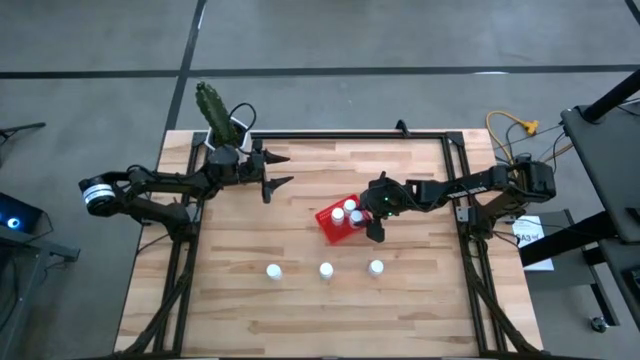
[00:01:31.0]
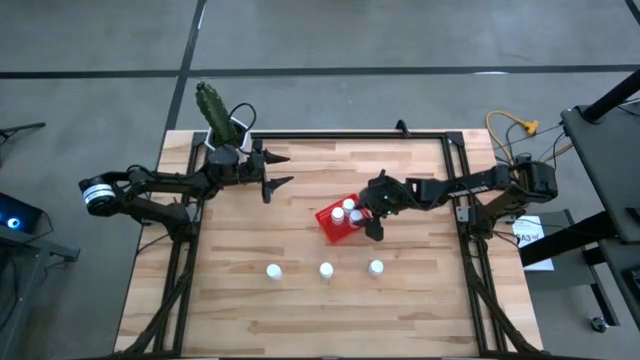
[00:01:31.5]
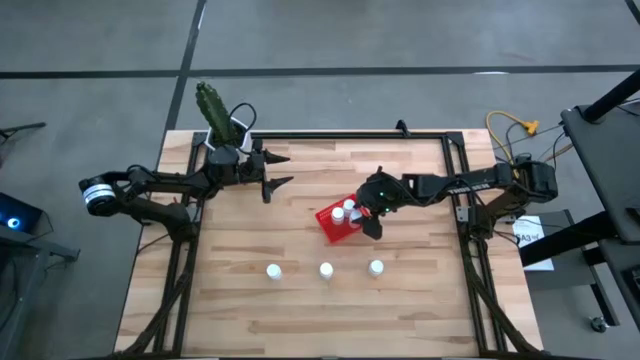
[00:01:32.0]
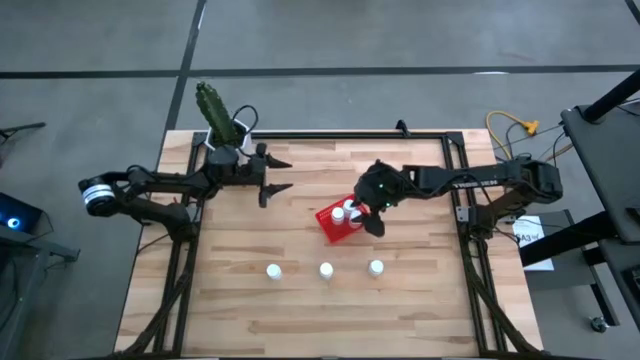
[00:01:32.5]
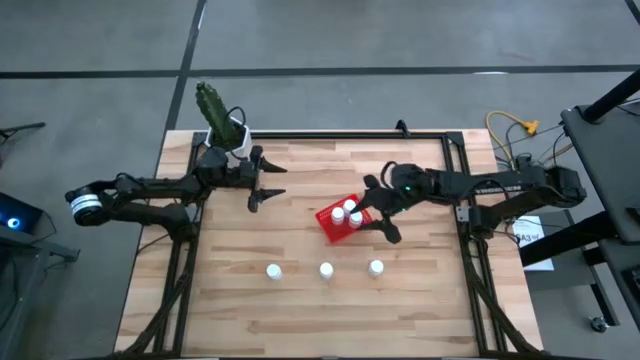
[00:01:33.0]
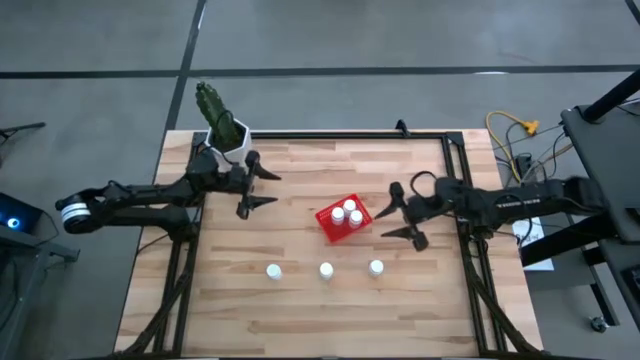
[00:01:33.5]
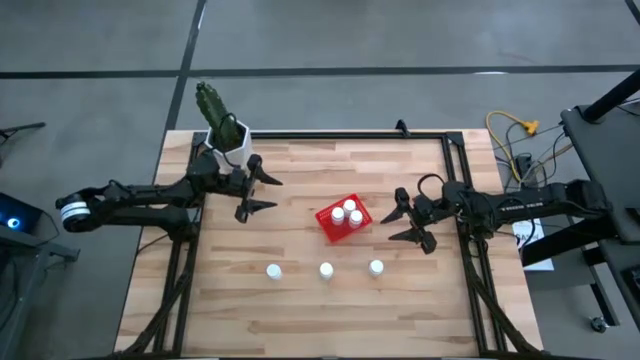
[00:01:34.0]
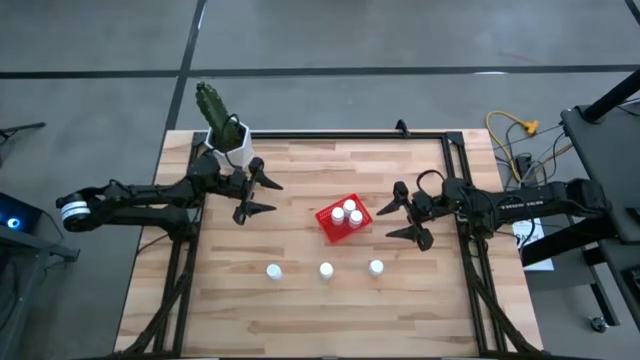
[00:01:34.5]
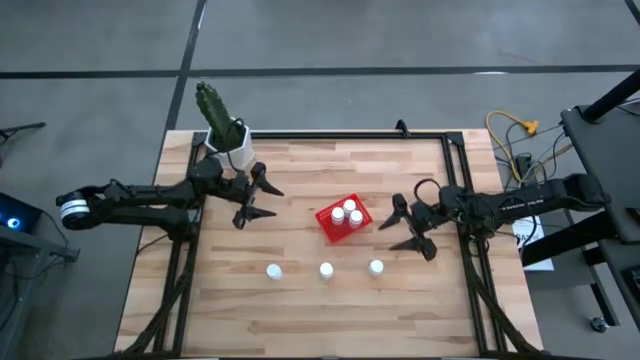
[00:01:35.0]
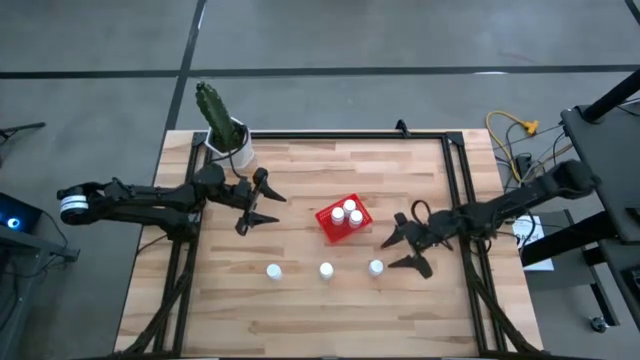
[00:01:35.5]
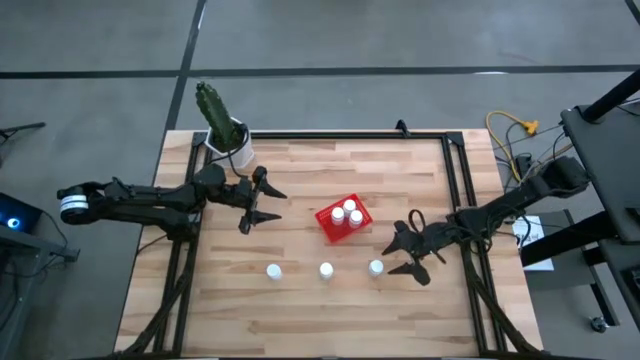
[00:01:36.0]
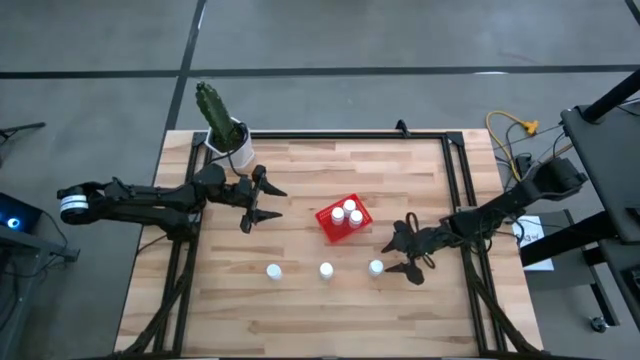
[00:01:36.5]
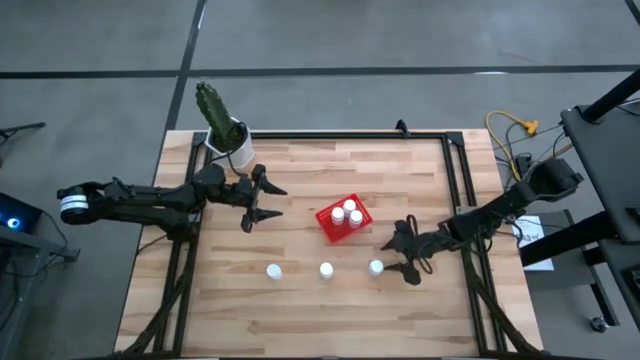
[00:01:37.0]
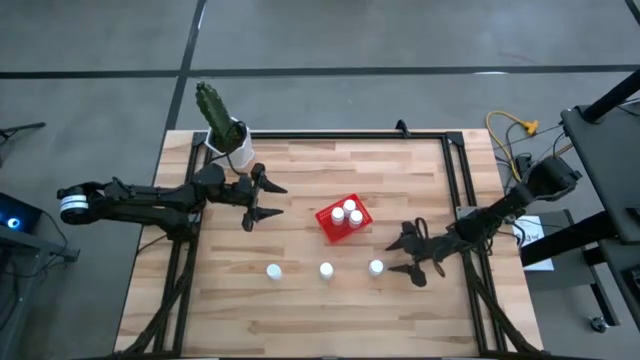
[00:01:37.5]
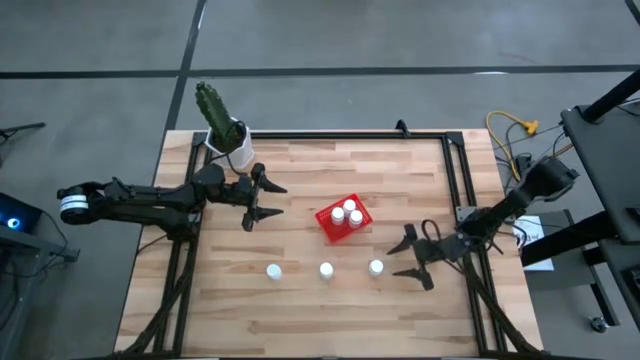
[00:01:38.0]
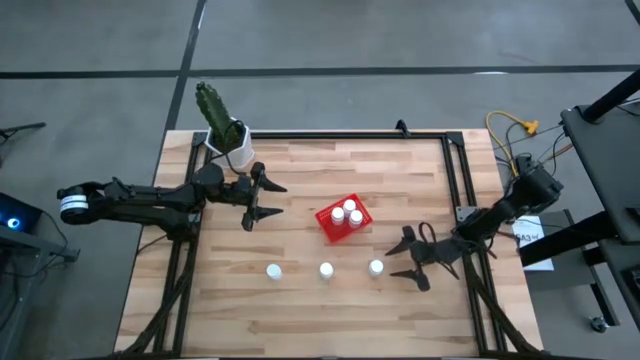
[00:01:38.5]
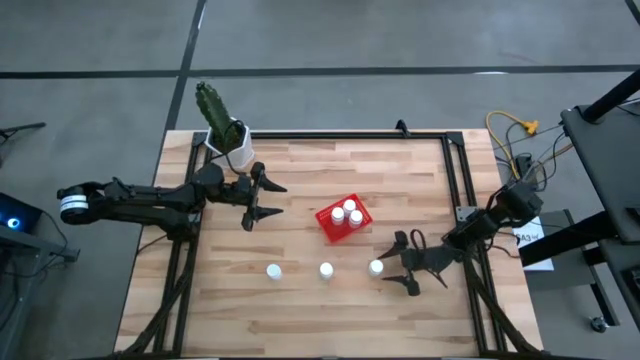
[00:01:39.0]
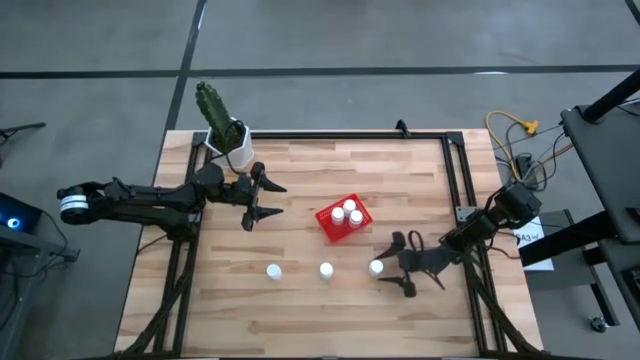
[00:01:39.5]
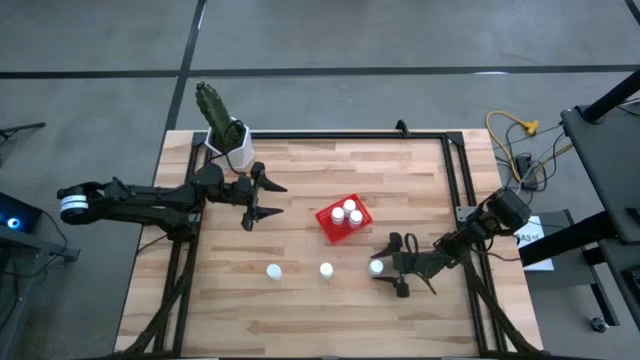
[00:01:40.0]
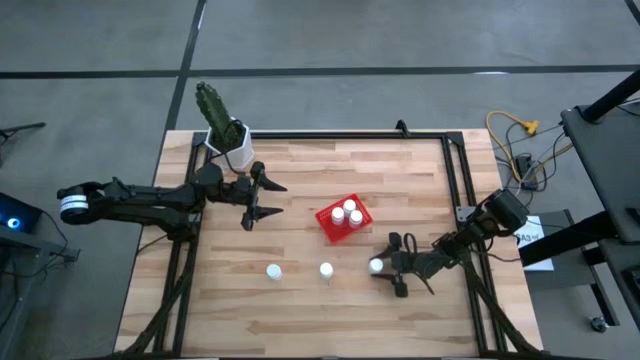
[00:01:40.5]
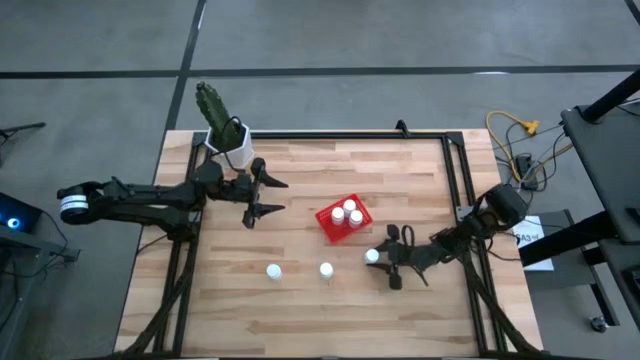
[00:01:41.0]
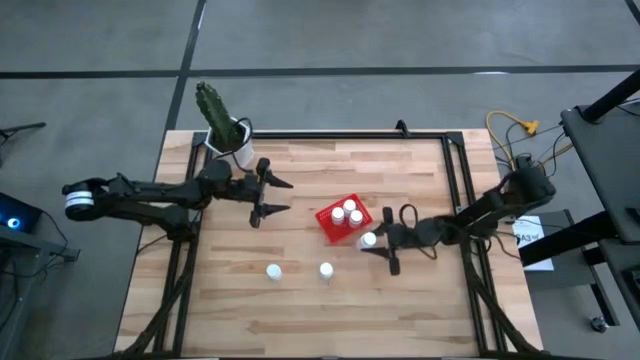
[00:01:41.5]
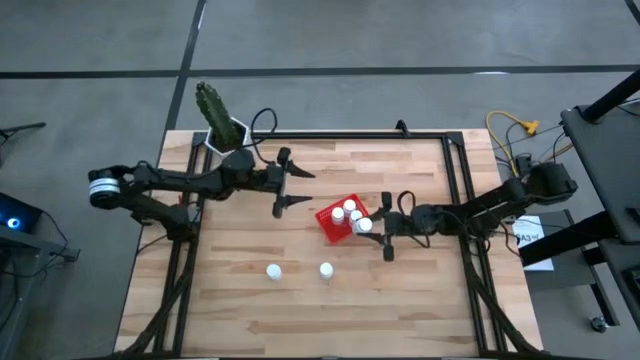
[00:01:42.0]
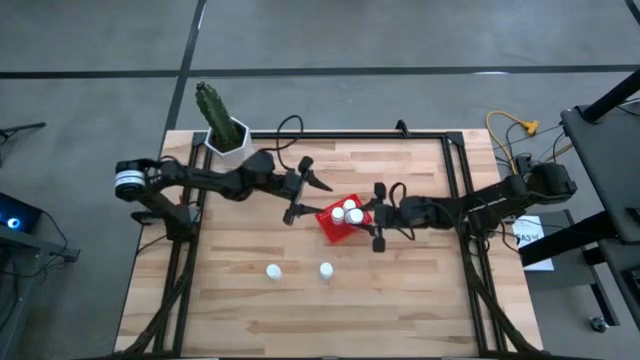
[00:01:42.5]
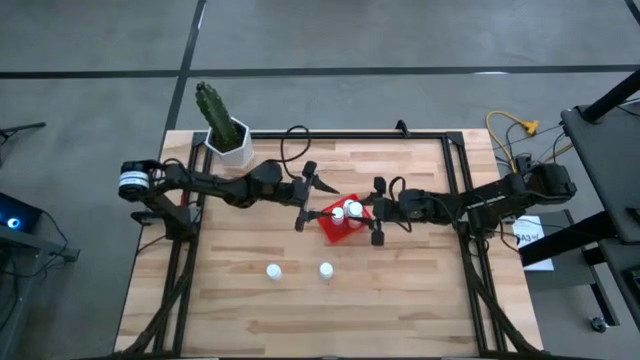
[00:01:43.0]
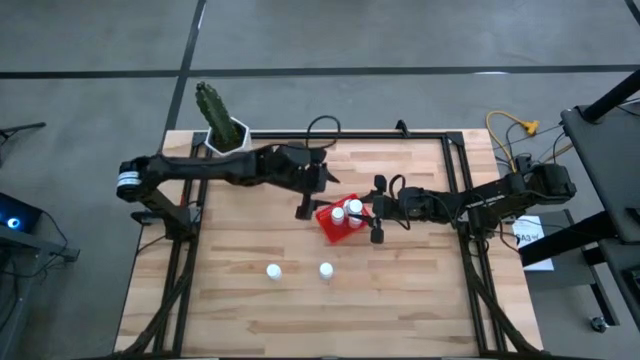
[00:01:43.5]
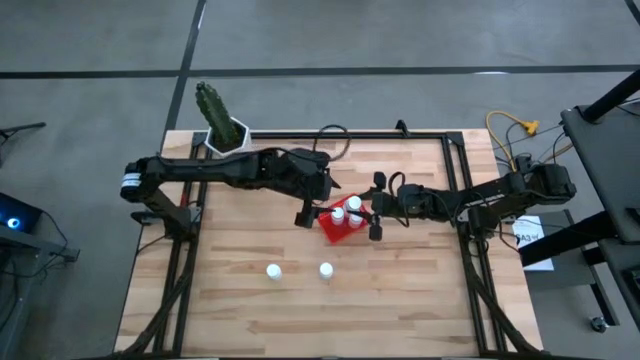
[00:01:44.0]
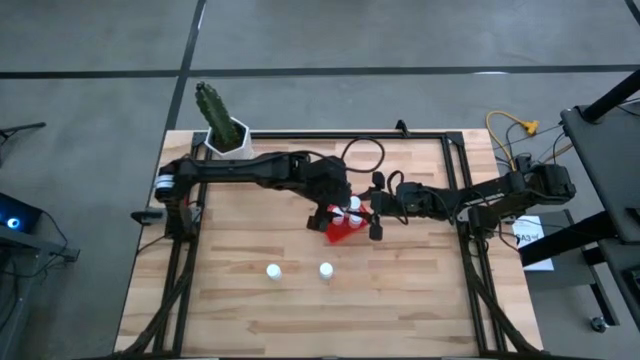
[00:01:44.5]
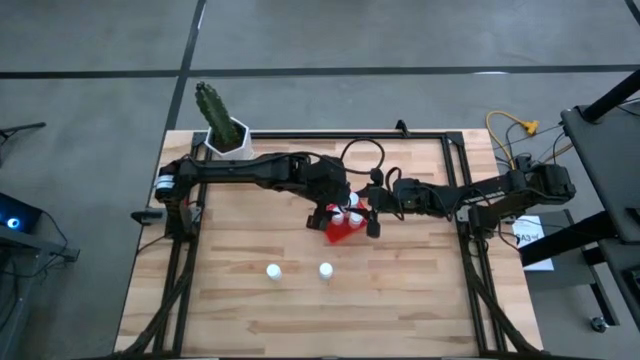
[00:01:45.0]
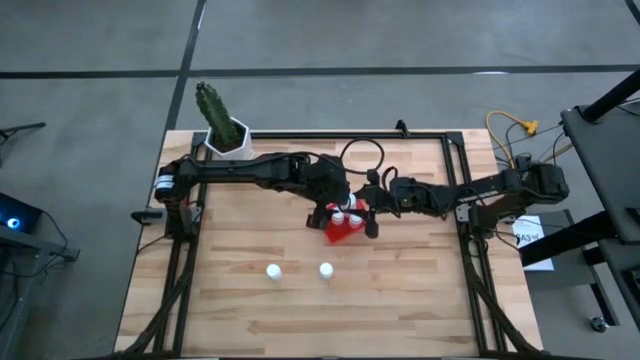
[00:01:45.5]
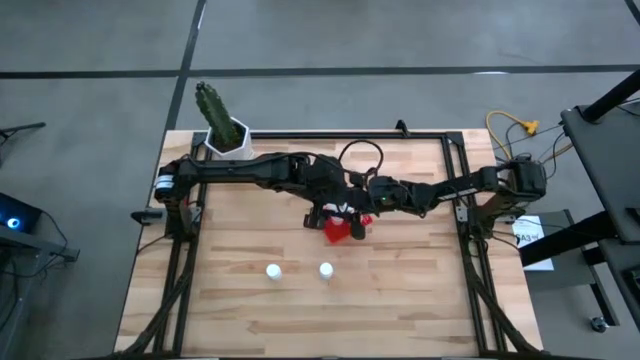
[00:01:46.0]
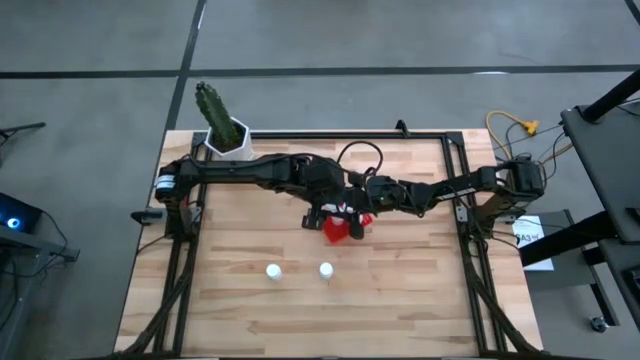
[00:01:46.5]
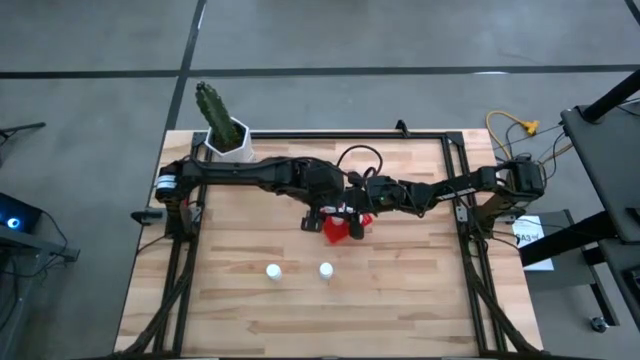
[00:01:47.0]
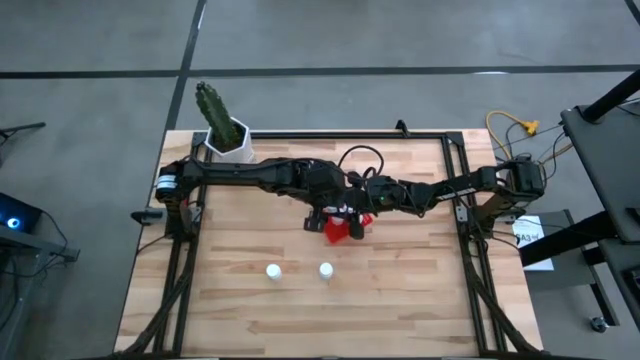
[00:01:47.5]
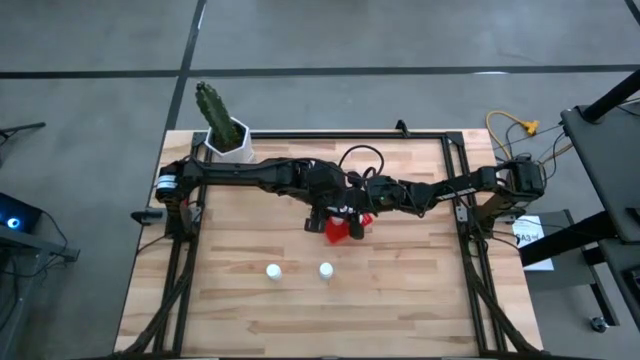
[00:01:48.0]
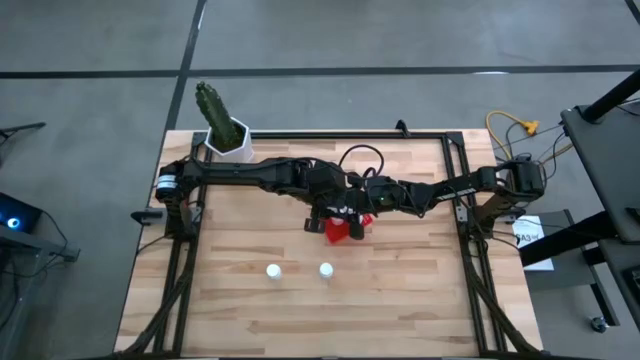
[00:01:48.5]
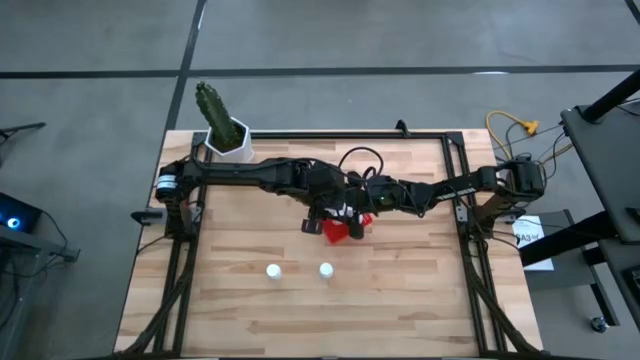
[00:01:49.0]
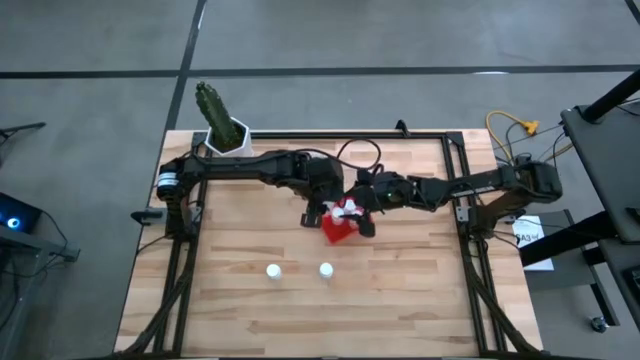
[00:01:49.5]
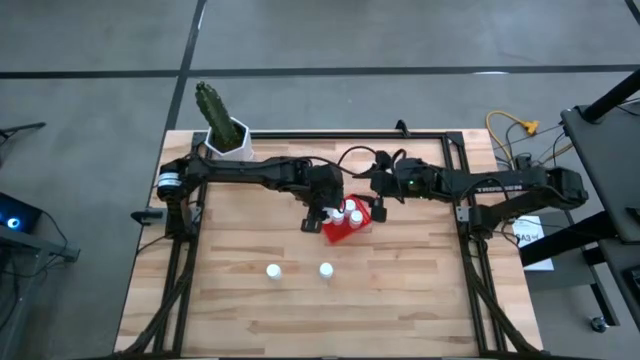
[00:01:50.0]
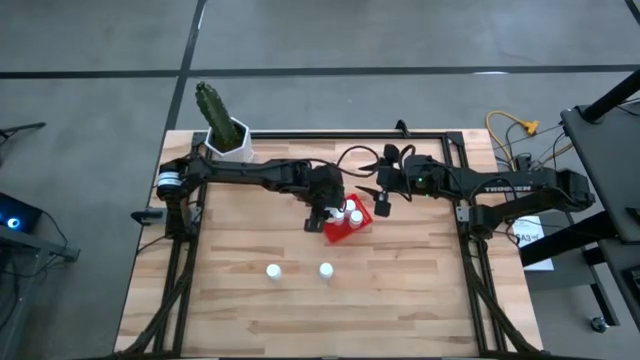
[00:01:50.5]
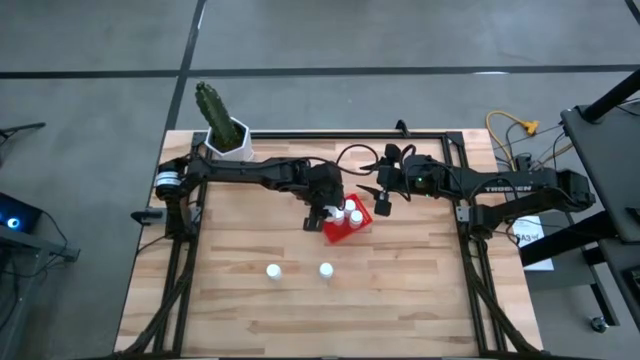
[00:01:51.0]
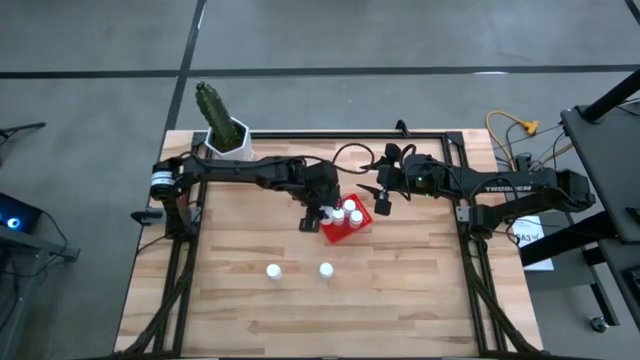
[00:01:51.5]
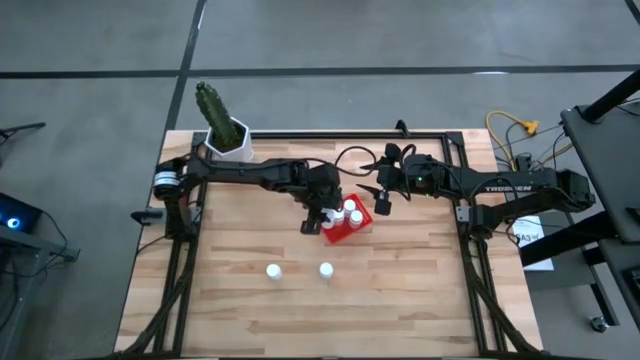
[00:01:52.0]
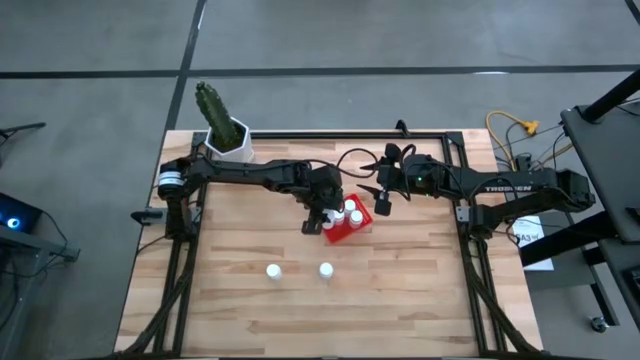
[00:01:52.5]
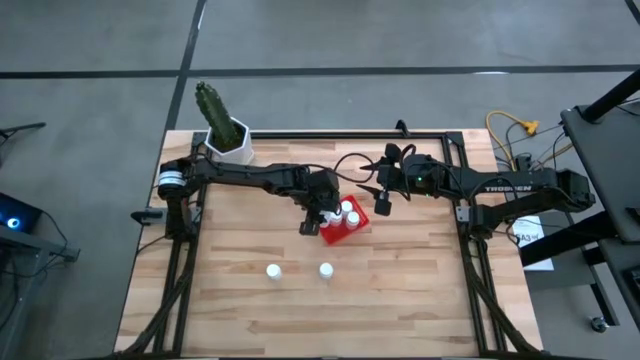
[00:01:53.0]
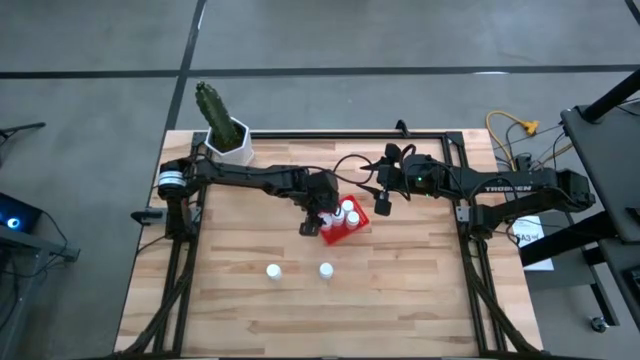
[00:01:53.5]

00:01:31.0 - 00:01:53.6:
Task: Pick and place pill bottles into a basket
Put the white pill bottle into the red bin
